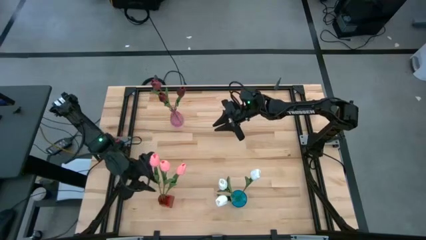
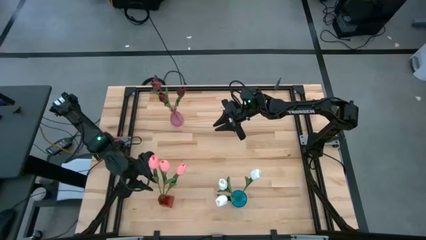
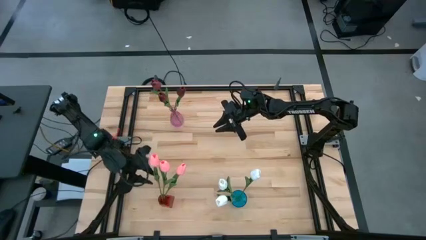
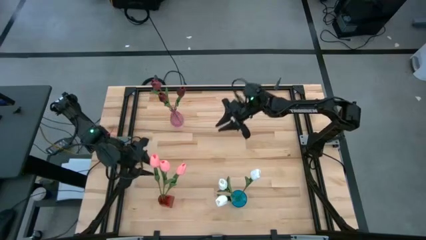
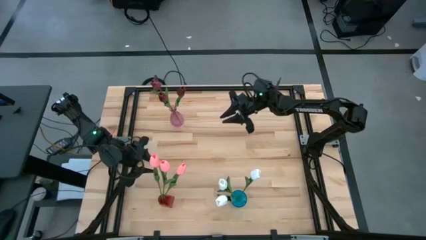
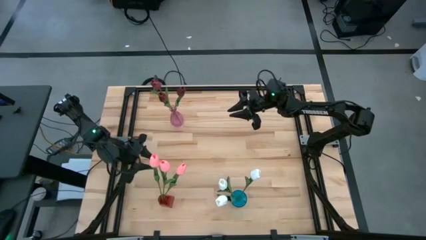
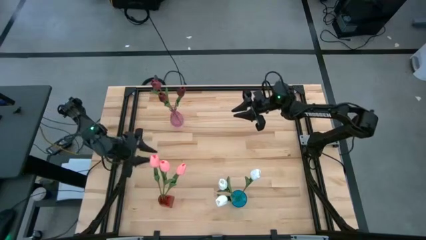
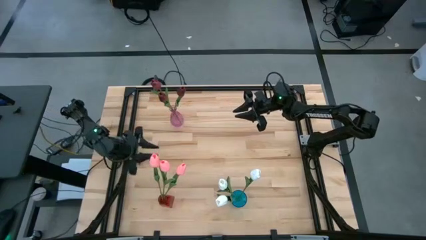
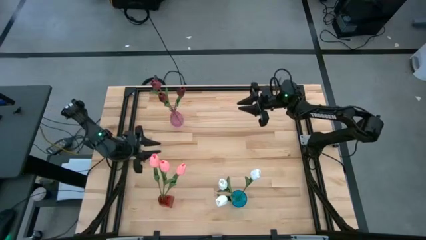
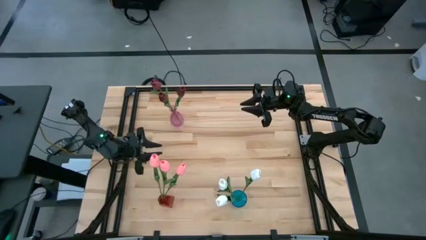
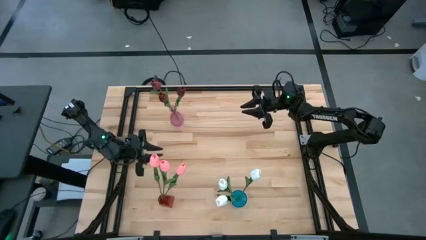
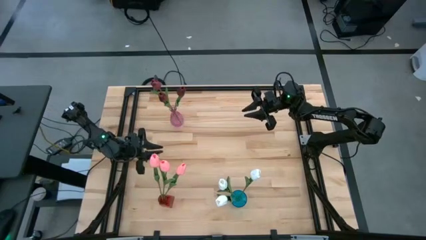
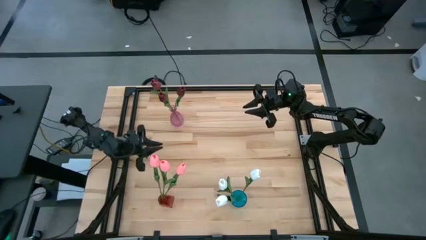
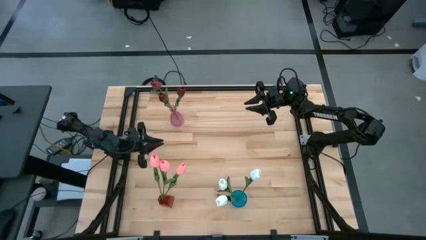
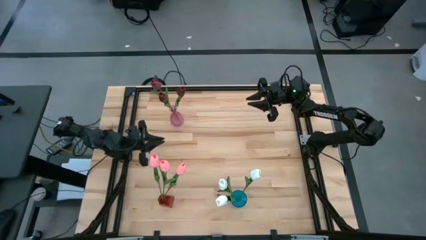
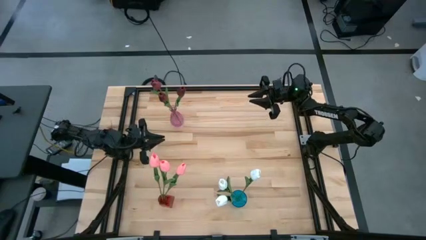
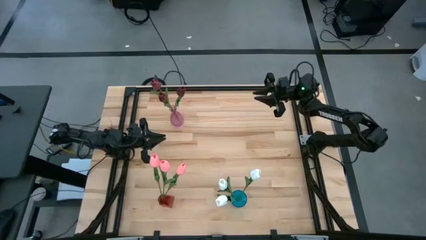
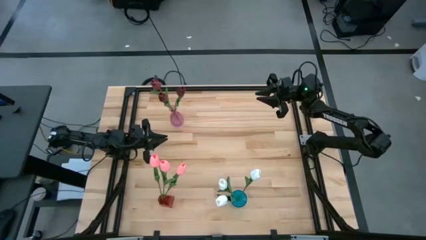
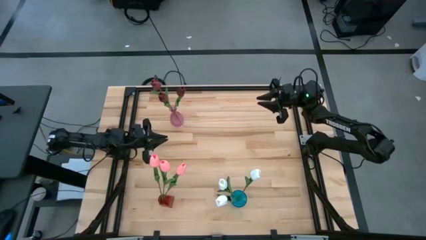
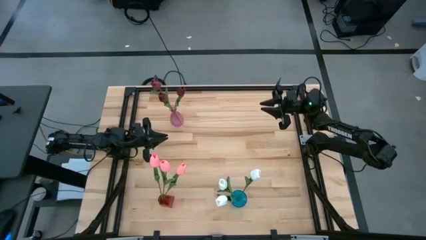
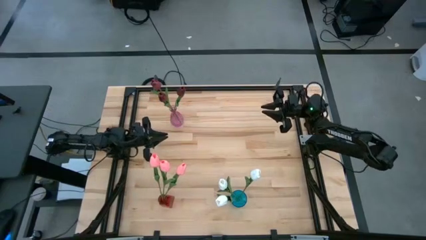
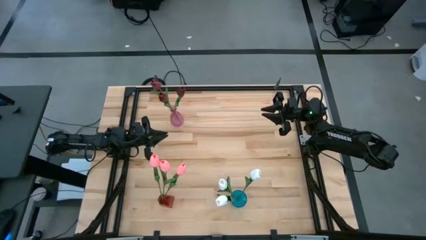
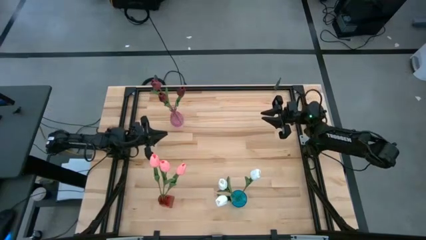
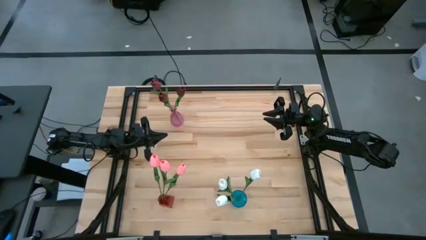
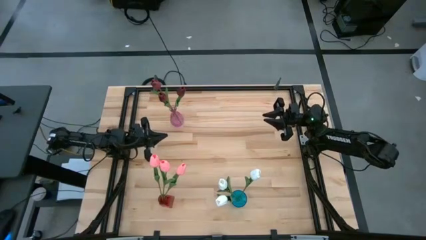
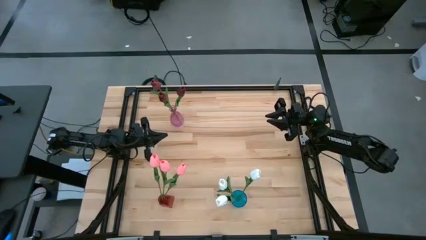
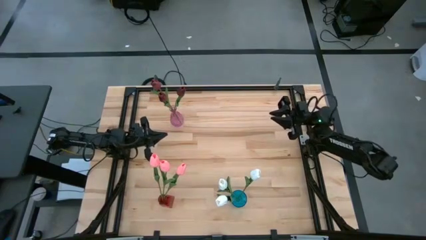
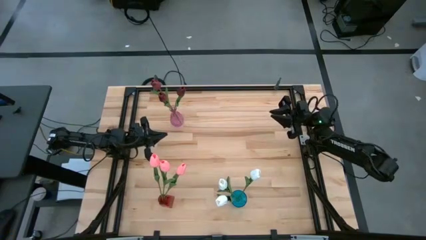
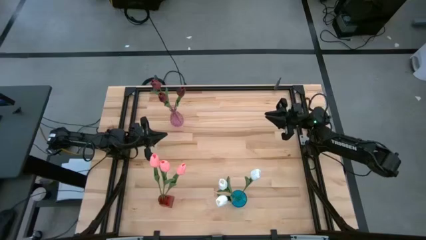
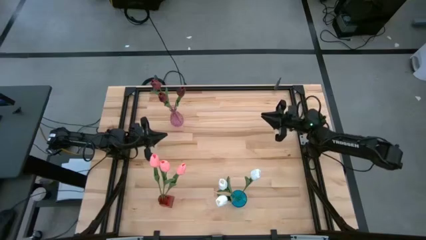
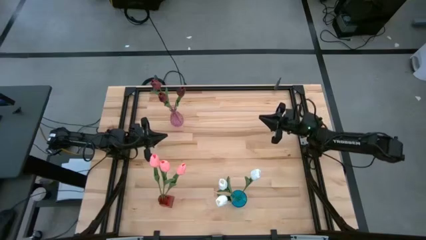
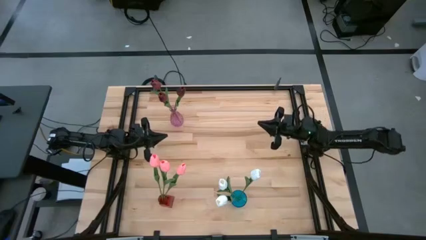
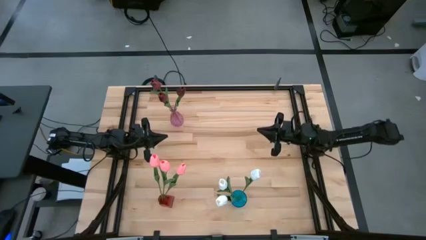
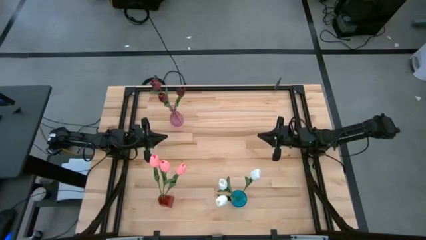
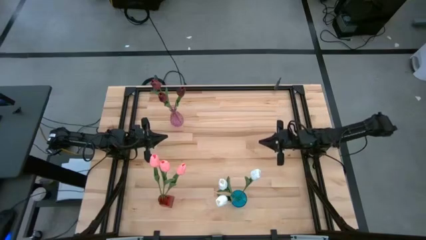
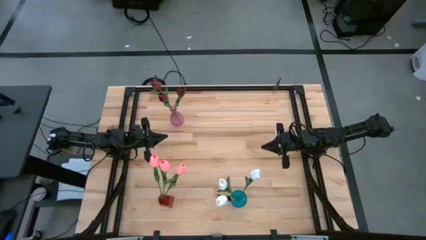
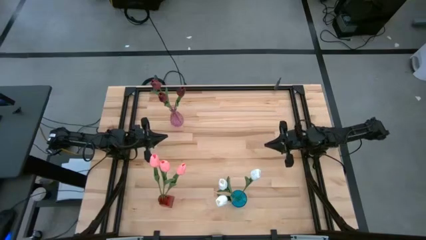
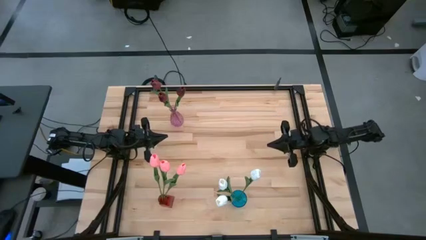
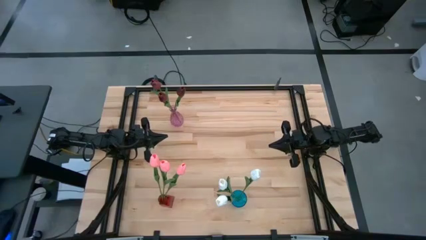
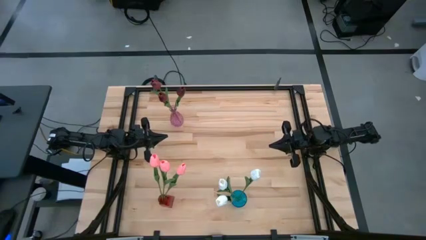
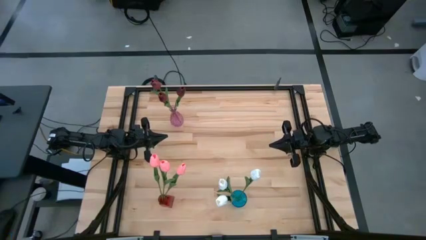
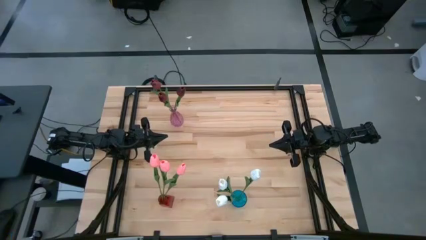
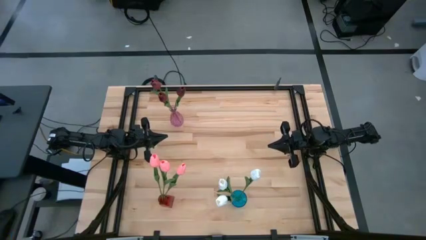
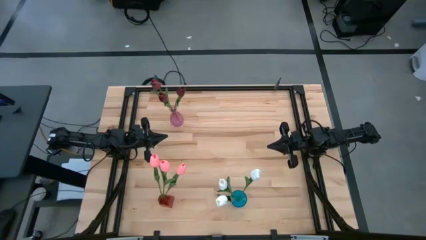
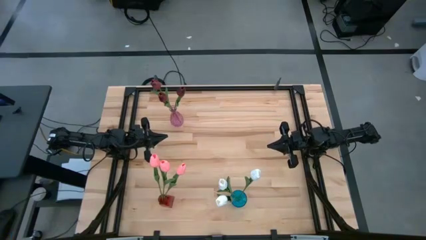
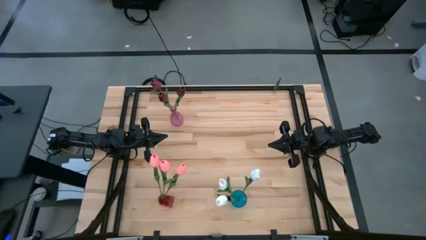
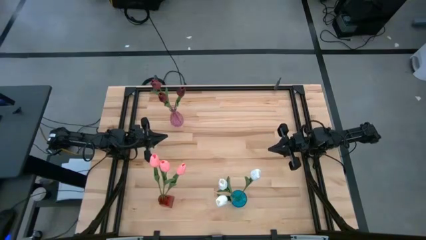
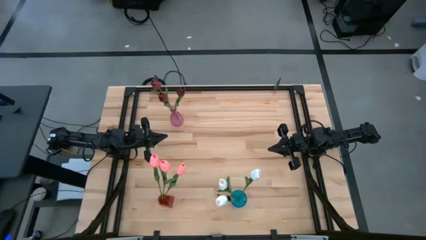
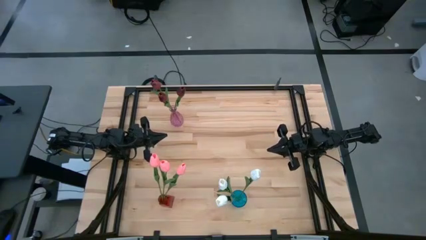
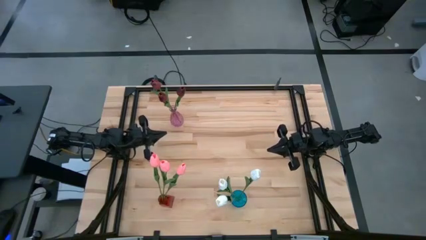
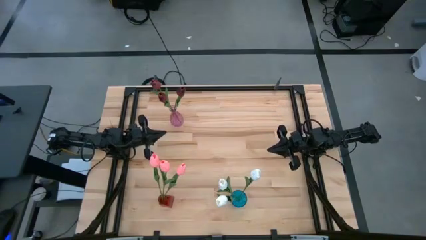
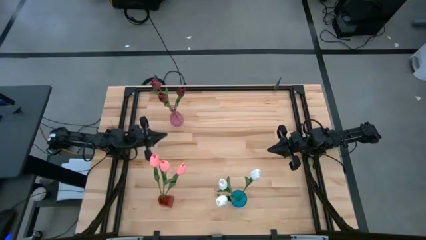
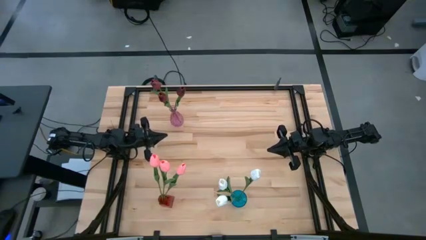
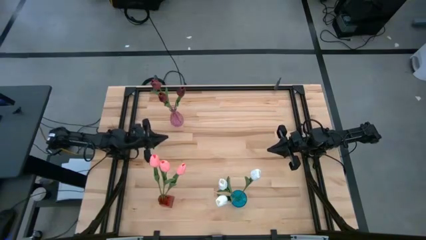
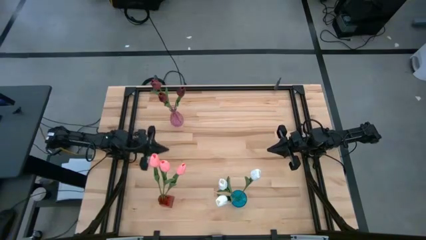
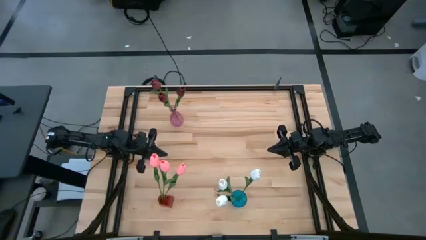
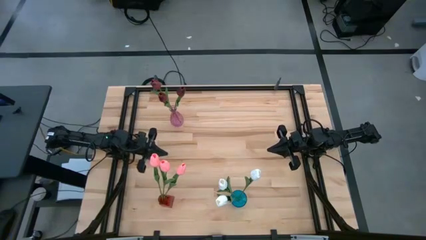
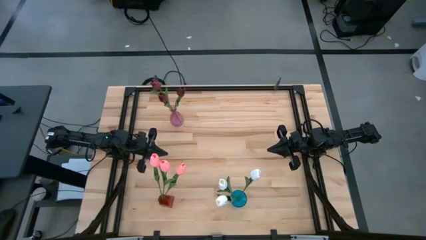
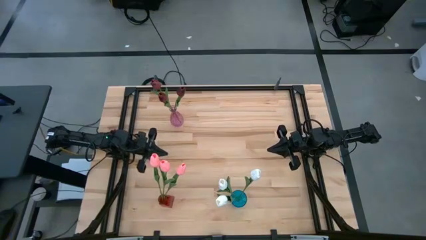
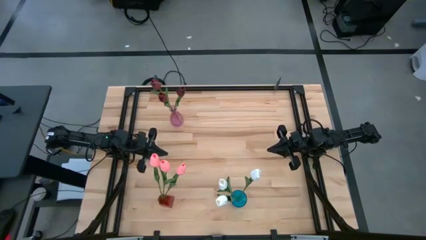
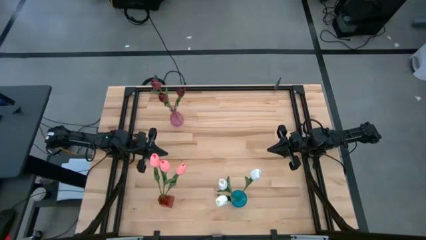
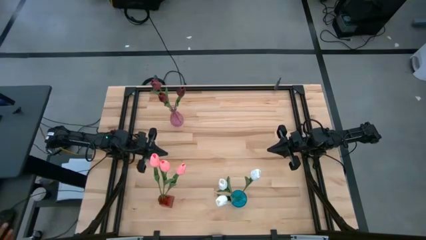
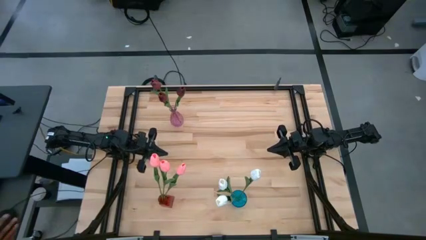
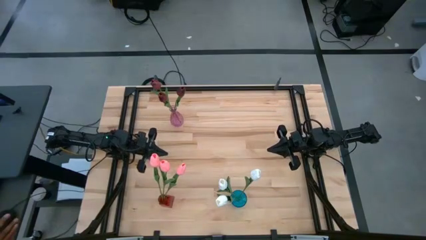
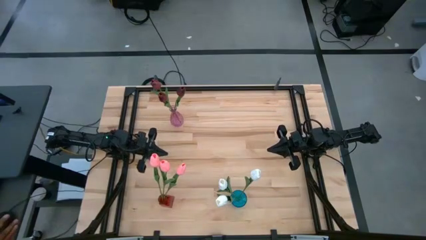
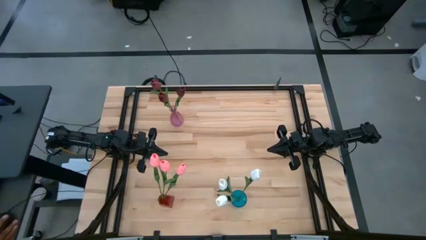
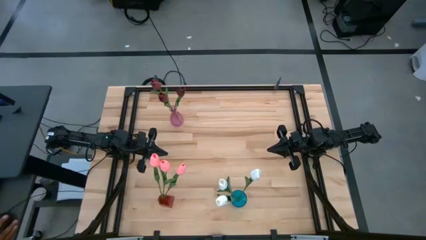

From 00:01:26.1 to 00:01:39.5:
Task: Sort flowers into vase by color
Return to Home Position
